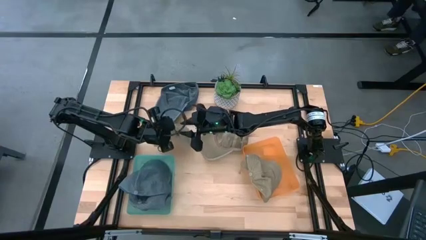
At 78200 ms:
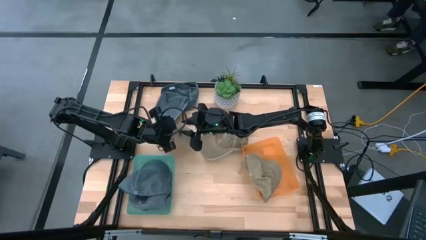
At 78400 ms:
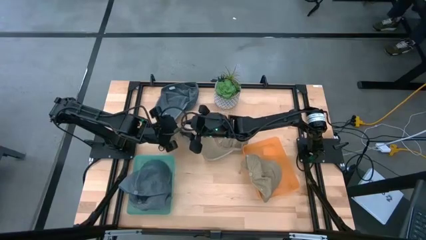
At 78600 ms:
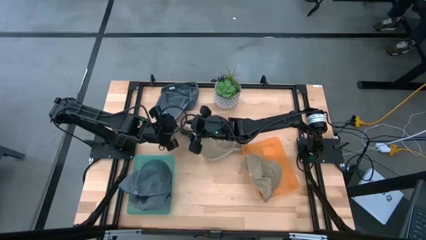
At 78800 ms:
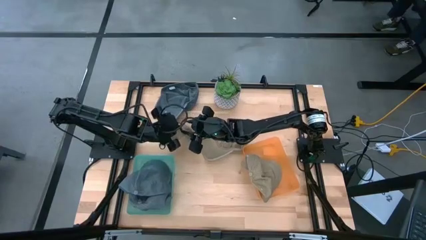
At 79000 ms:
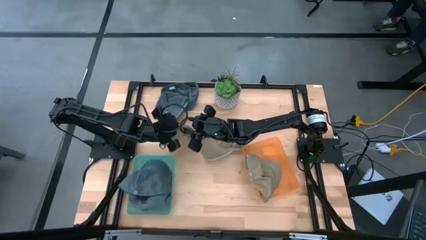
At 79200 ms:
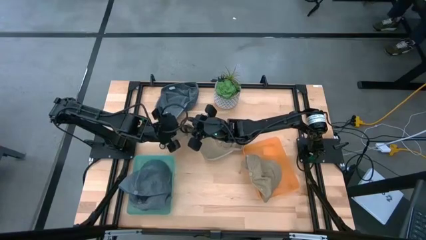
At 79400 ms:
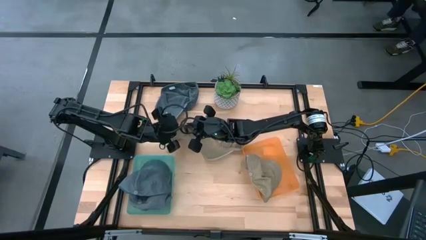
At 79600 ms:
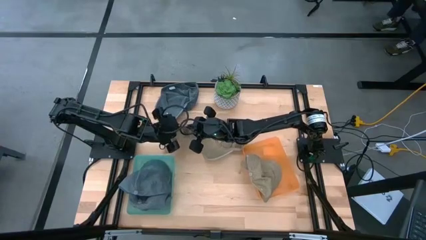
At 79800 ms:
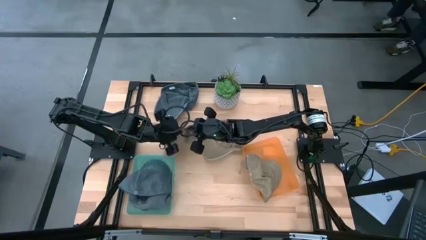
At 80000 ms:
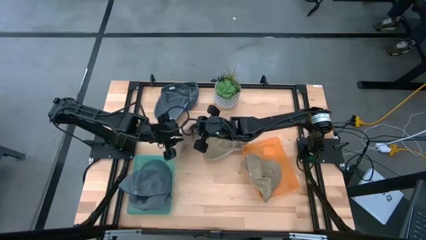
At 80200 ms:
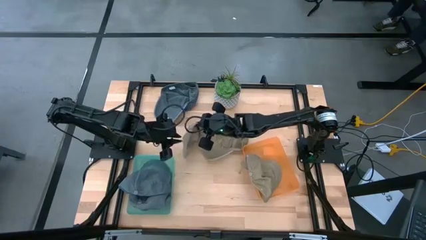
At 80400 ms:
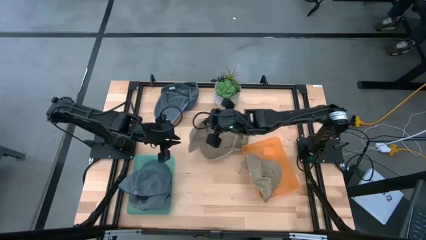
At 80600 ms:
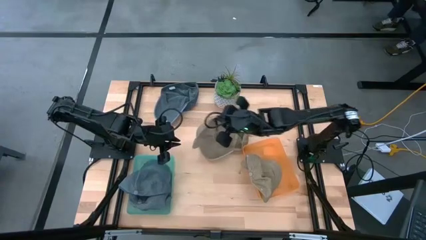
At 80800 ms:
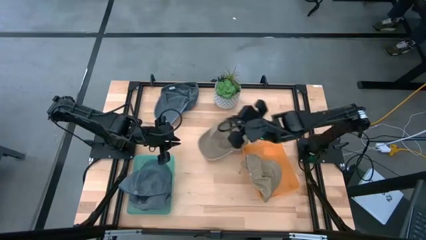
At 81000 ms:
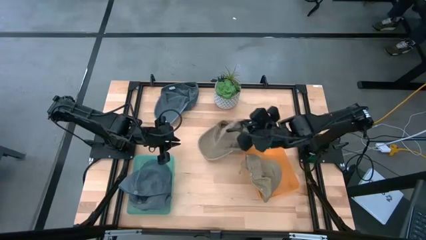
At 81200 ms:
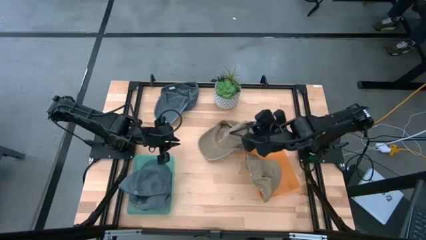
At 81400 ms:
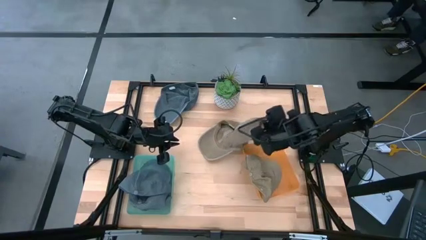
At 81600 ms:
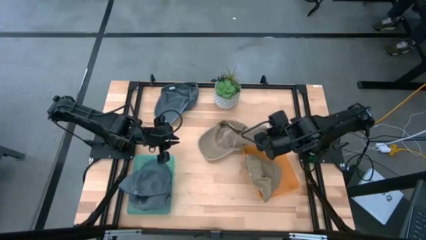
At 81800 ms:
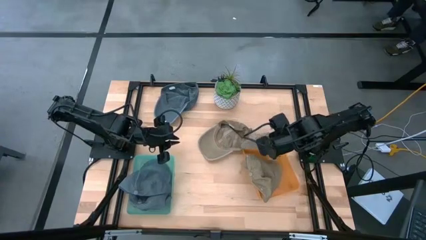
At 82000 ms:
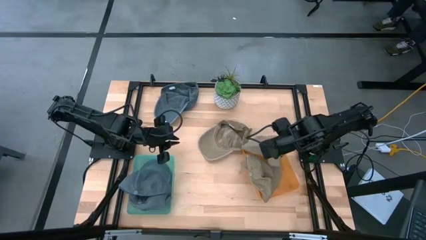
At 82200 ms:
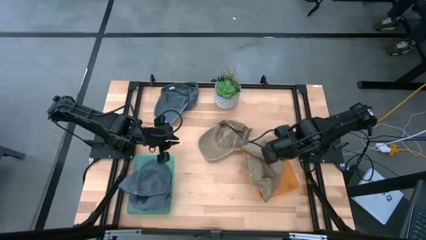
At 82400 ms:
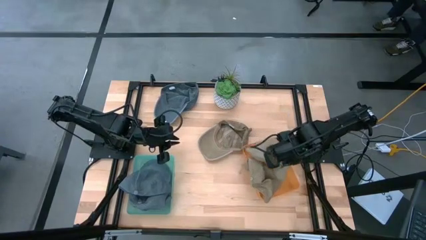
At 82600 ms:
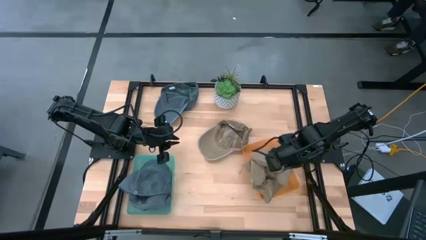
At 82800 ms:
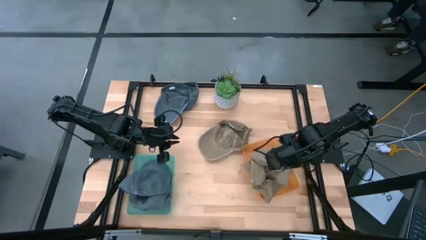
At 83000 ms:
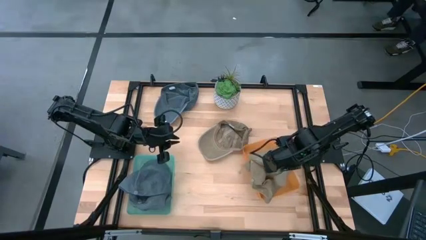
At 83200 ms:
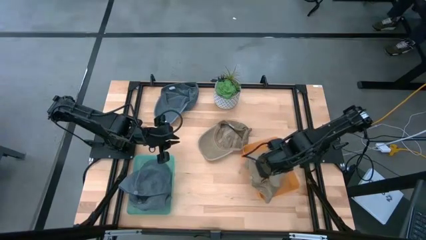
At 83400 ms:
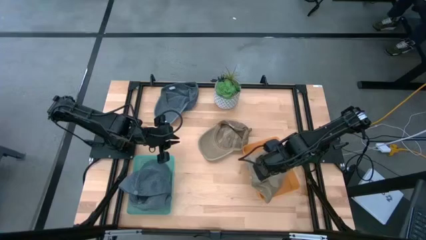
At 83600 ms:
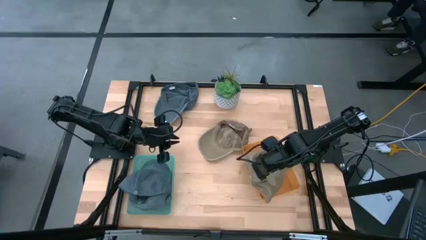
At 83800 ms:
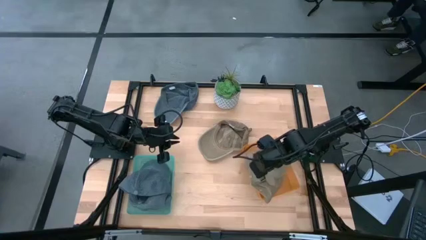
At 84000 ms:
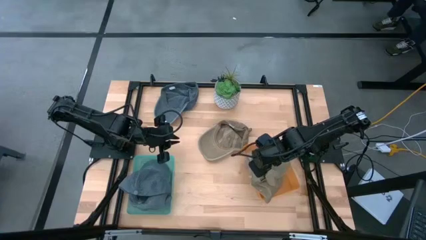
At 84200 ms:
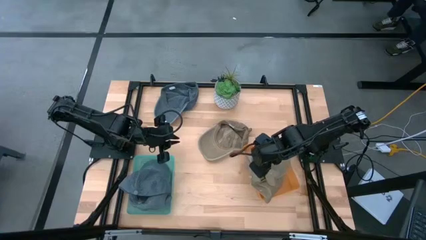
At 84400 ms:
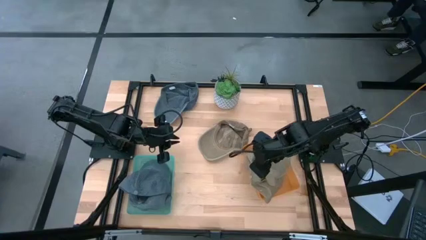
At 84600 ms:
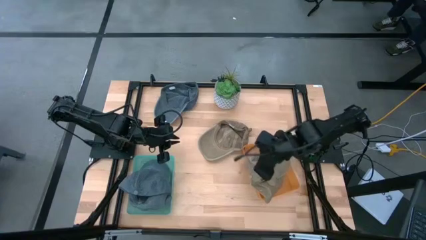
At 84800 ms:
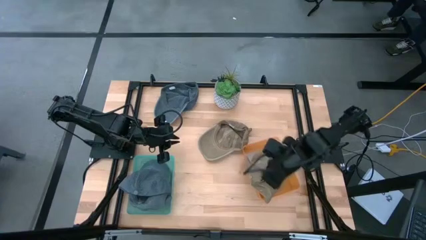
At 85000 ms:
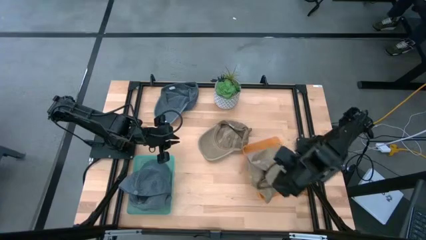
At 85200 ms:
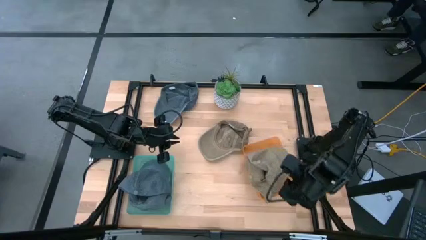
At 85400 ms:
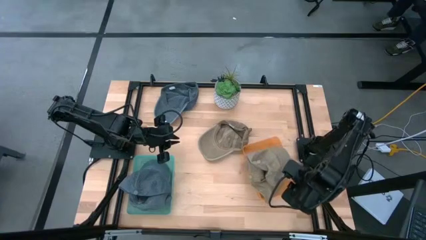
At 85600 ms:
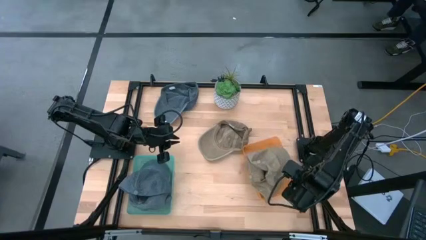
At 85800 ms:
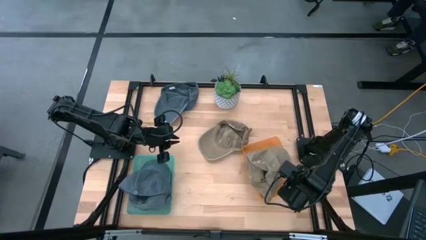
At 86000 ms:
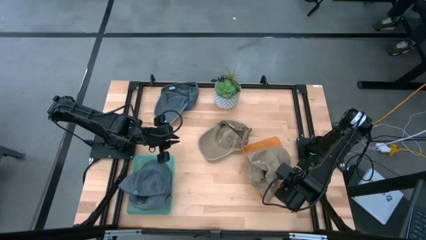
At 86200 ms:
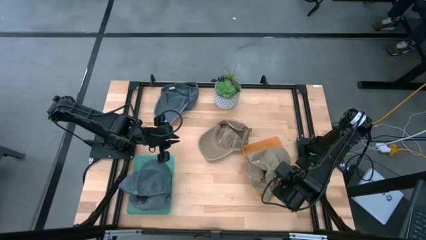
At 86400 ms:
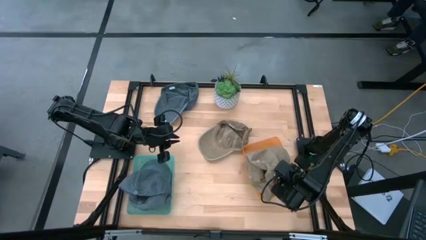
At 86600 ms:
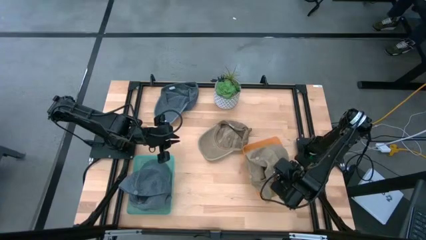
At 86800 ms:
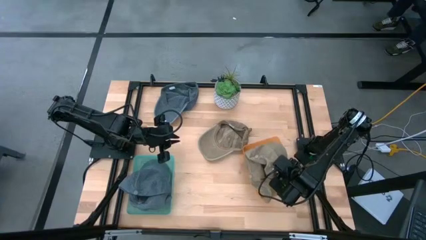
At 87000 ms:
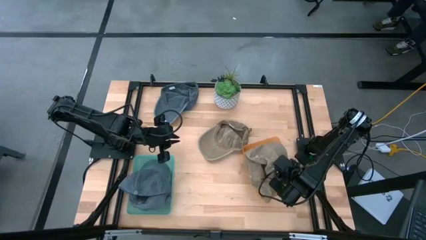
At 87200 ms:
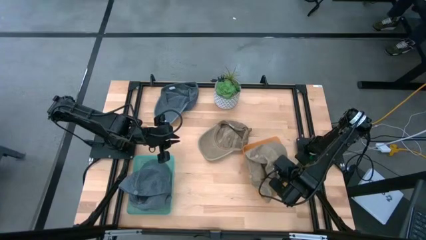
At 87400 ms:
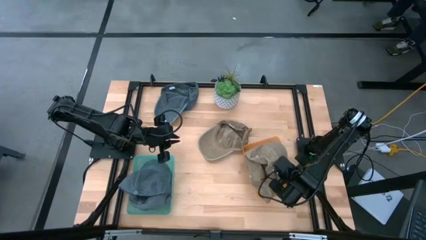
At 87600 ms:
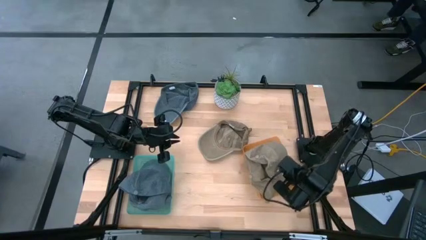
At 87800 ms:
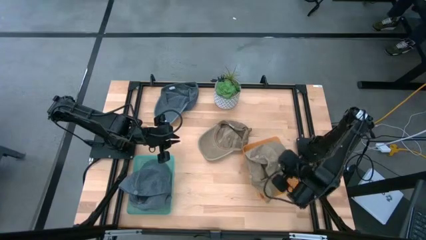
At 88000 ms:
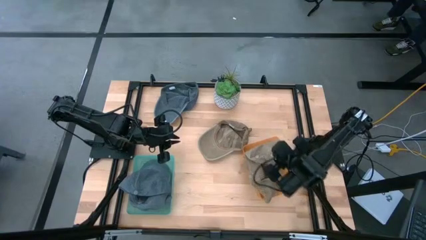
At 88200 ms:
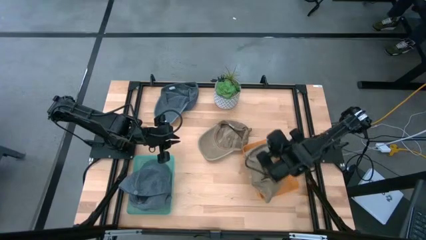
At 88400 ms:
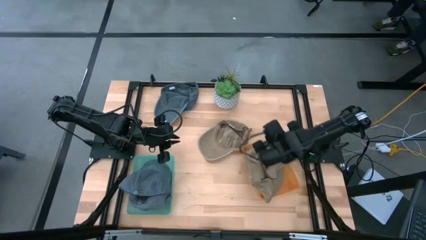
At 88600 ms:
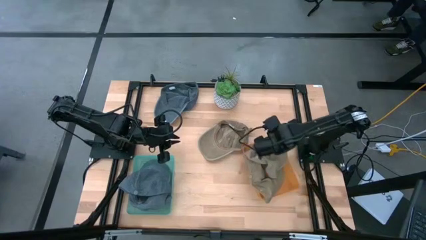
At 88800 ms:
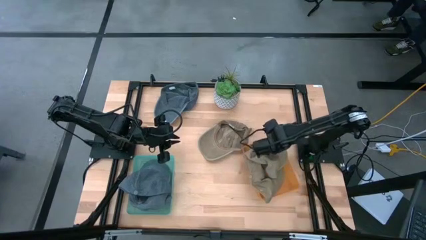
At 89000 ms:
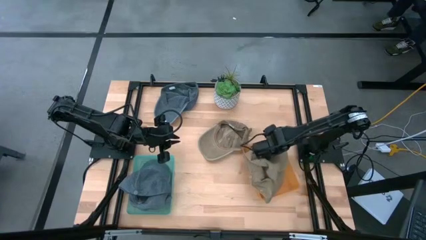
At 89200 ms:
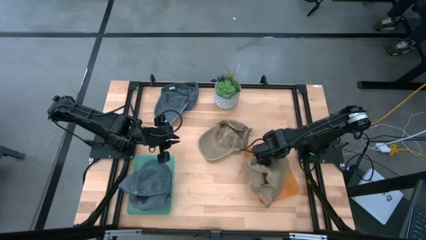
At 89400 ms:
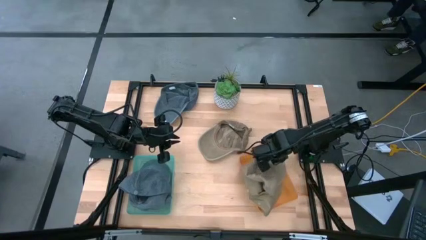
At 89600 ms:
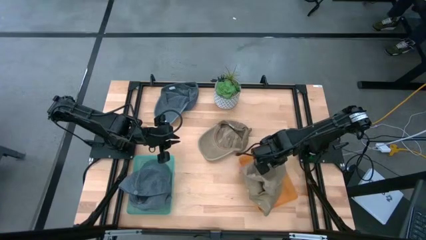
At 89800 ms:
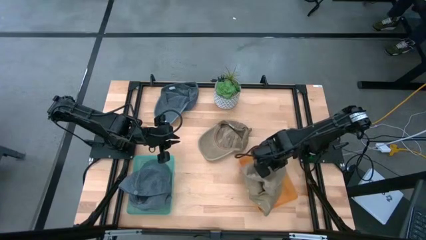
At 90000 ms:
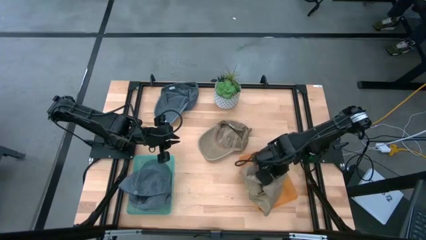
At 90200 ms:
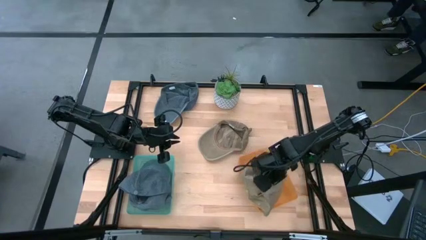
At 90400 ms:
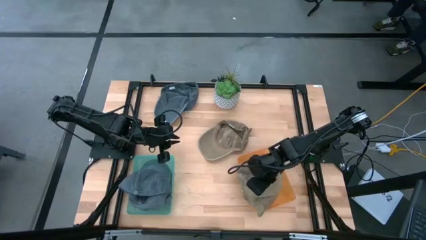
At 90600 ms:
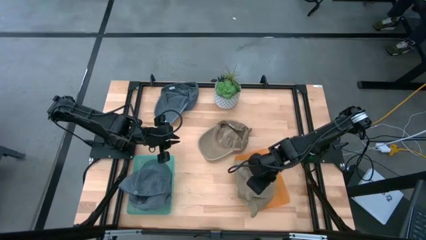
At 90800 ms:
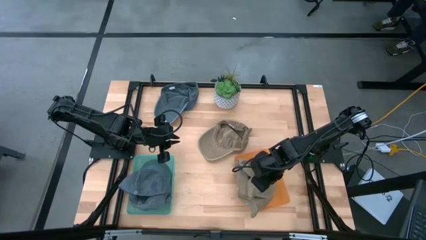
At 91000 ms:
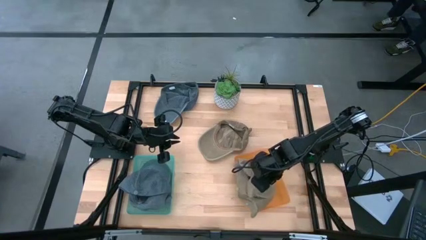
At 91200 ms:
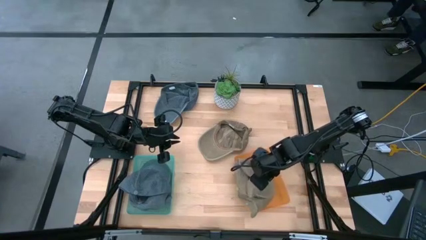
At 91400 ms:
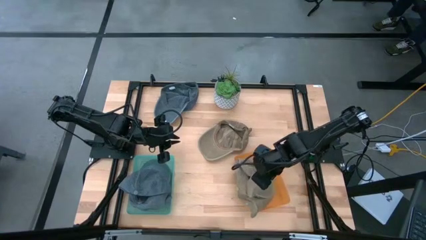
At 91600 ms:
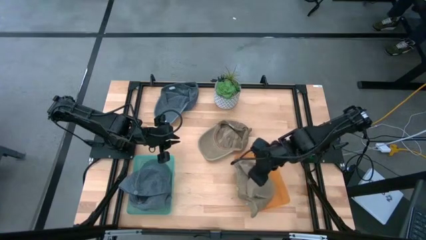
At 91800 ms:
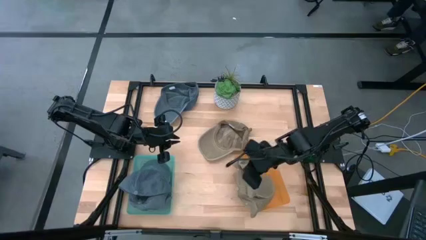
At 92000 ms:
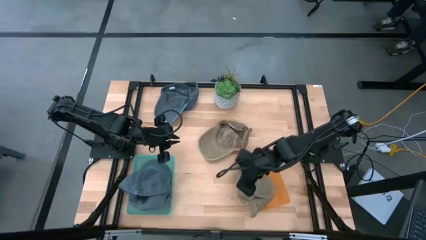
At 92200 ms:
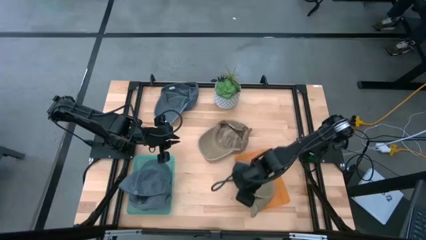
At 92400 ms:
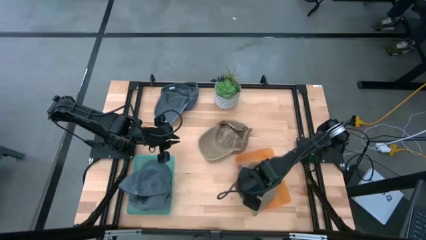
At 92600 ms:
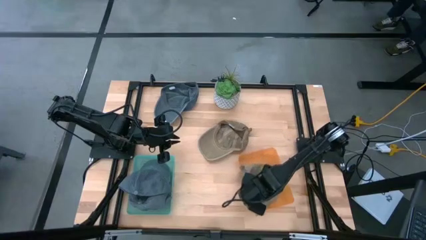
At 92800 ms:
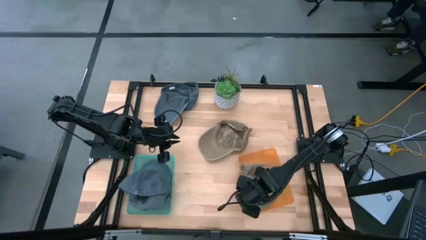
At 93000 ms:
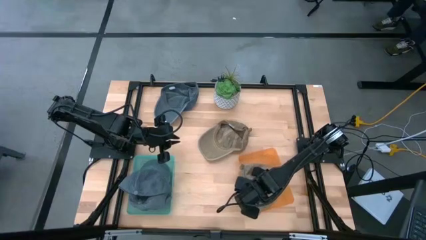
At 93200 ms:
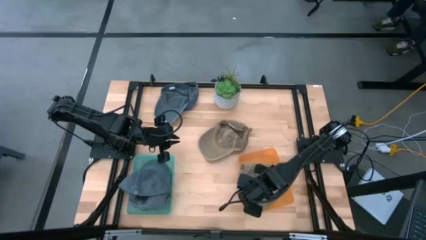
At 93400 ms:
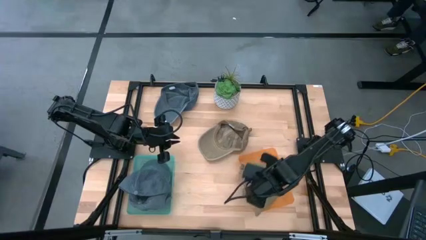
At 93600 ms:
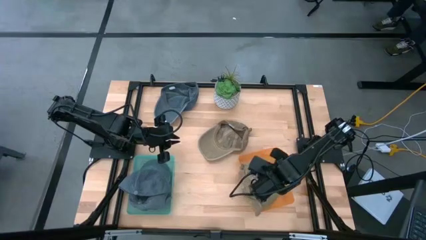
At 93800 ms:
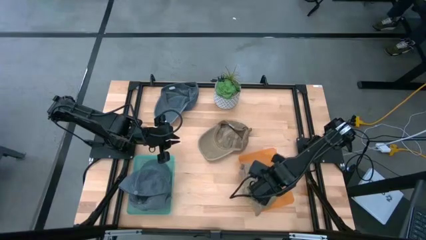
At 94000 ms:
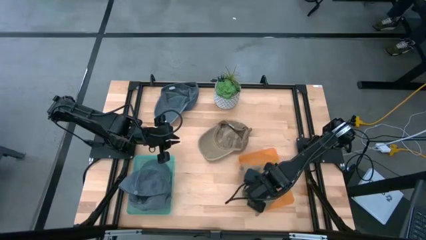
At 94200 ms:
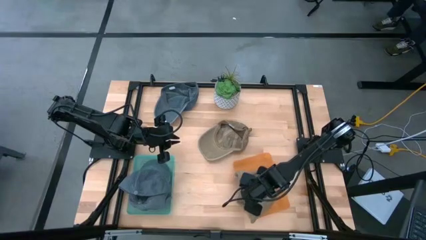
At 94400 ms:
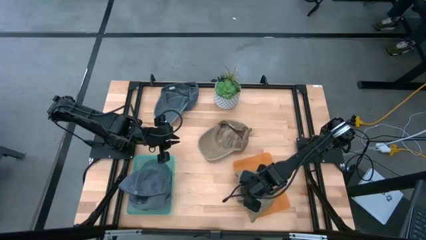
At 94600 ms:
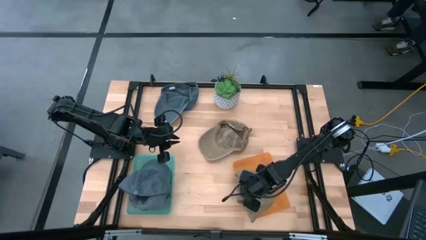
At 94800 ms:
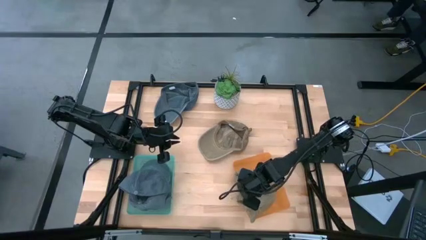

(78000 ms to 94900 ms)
Task: Pick & Place hat
Put the left brown cap into the orange bin
